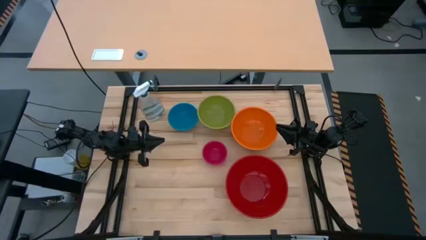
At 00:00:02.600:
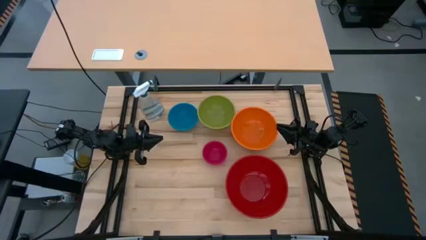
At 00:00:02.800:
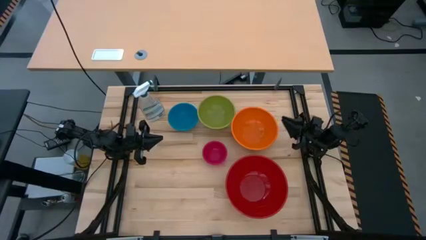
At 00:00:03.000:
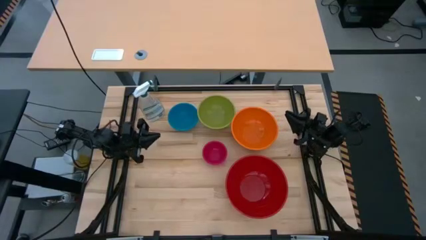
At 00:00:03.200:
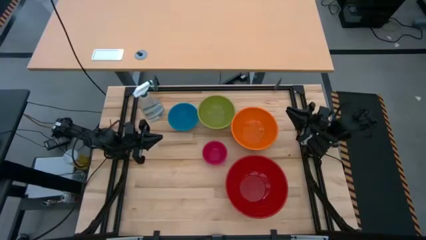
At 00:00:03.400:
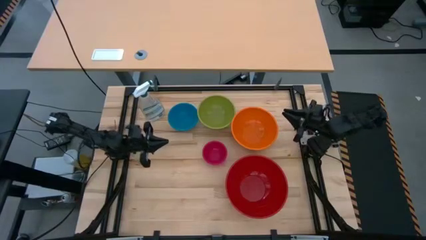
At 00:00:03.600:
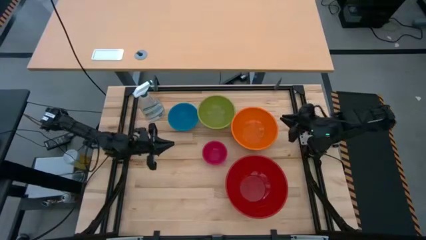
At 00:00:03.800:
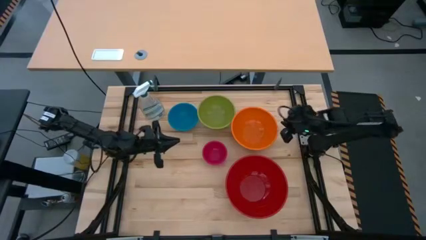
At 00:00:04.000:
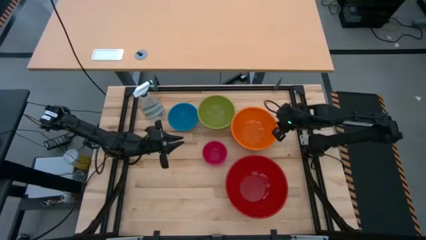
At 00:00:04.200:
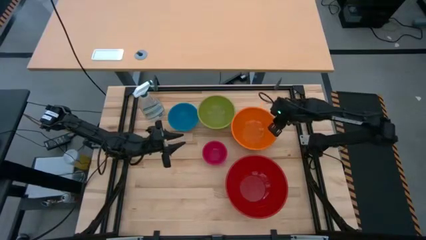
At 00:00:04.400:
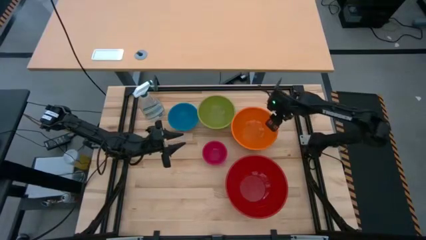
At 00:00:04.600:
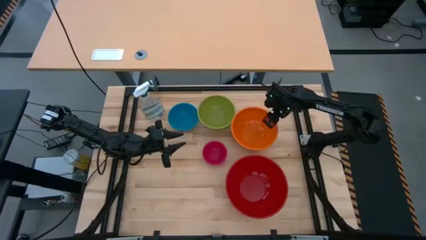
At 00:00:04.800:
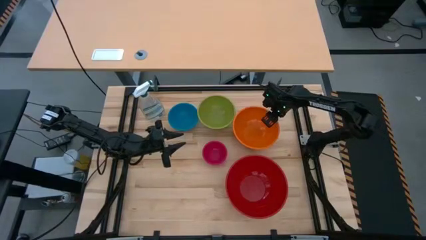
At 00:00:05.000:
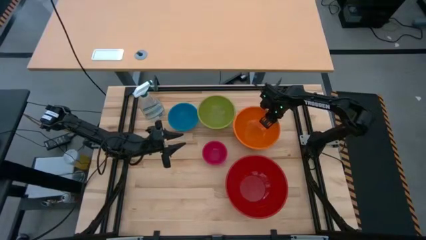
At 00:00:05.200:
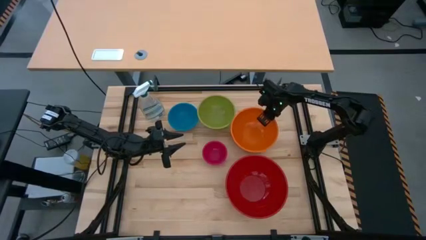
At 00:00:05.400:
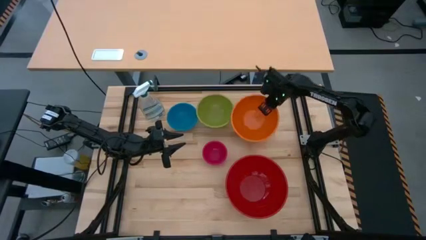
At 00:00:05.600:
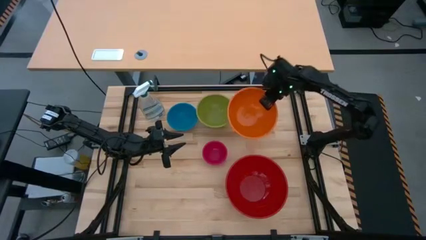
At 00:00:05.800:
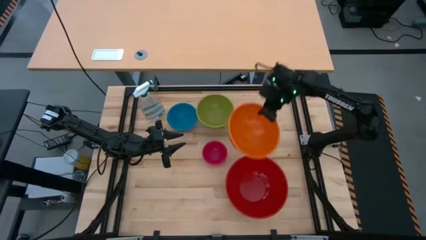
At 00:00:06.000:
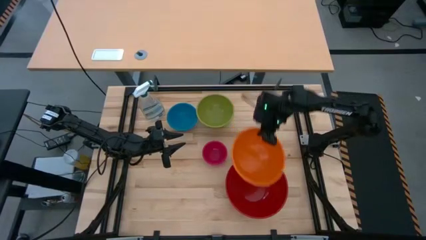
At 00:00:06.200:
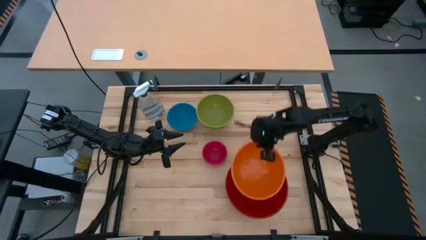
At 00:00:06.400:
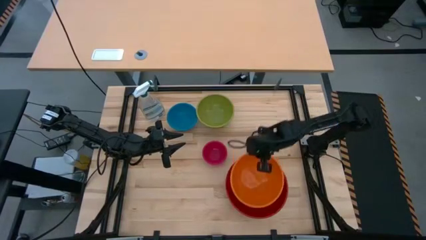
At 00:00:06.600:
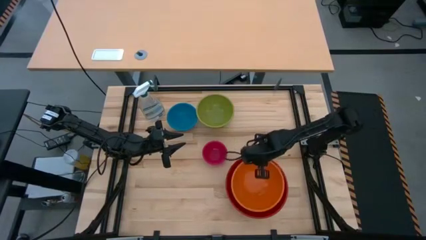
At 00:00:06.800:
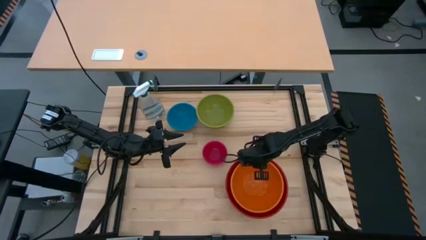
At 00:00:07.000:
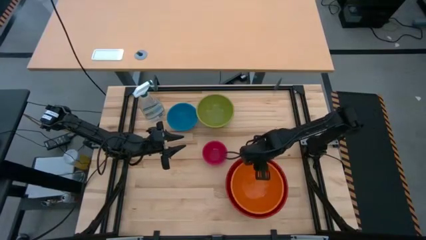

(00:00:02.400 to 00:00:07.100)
Stack the orange bowl on top of the red bowl

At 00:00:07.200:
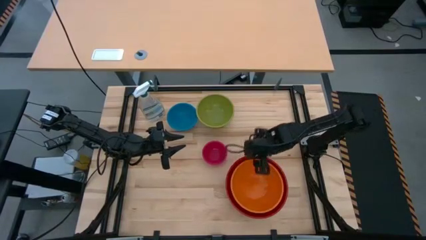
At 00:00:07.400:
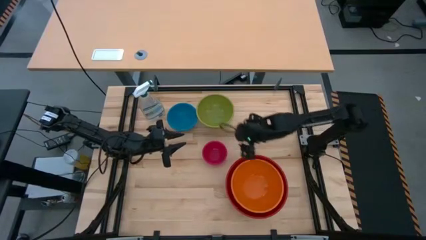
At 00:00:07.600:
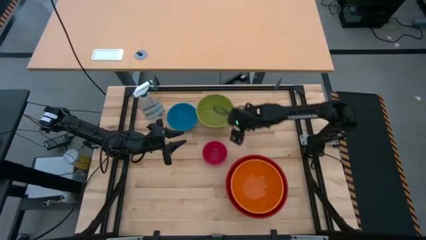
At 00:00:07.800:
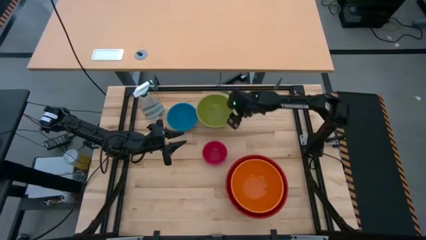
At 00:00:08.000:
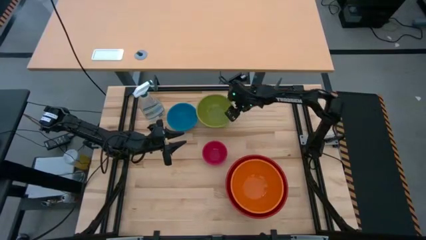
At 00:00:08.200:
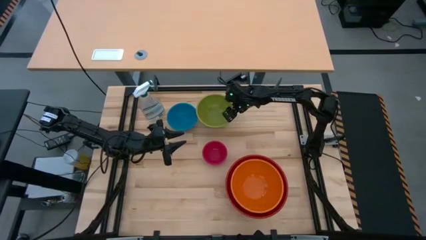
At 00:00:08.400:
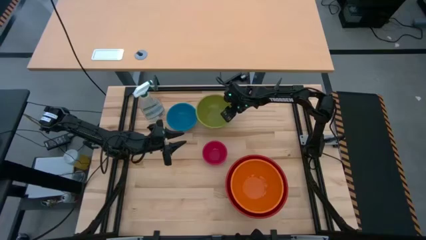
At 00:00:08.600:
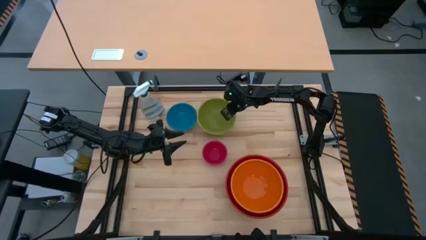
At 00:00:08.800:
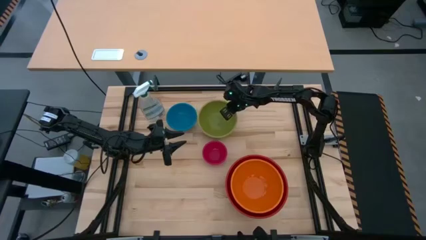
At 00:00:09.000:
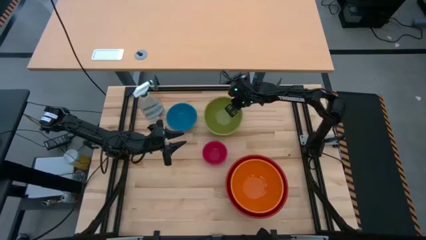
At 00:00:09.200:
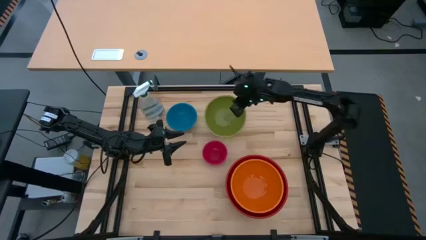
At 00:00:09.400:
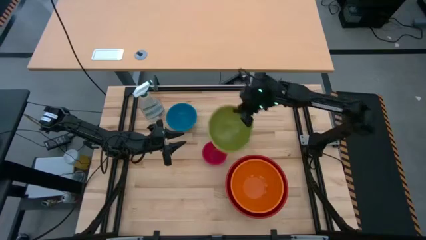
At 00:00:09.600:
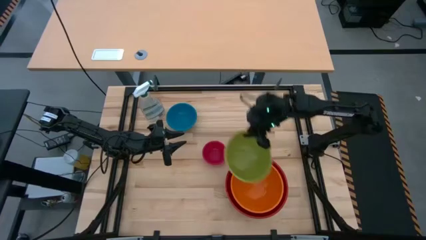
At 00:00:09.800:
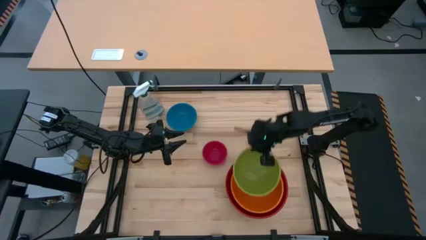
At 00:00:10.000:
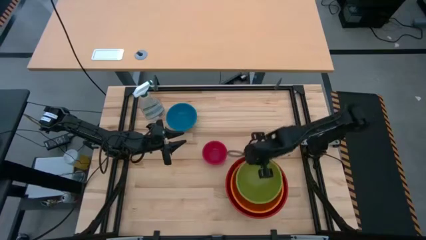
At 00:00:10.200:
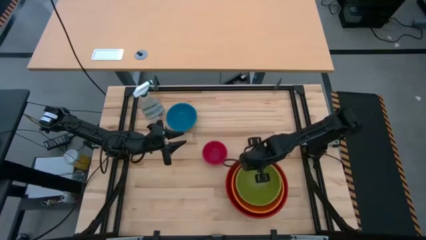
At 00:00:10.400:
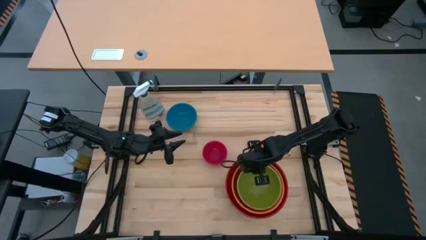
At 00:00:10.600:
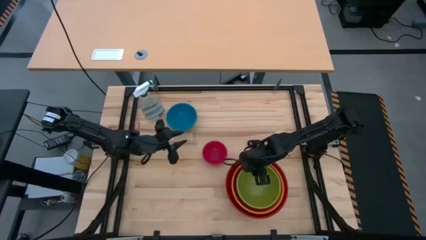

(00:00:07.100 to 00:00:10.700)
Stack the green bowl on top of the orange bowl

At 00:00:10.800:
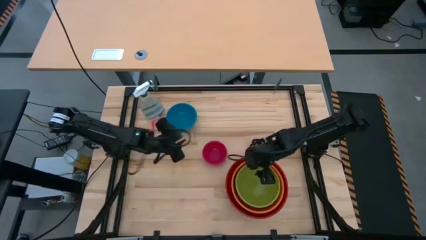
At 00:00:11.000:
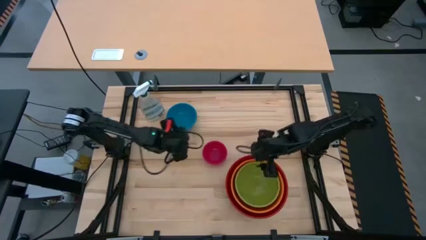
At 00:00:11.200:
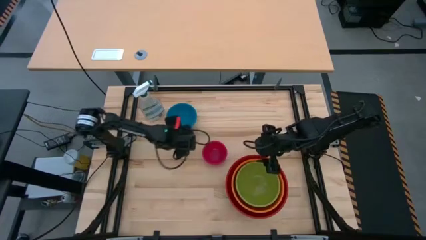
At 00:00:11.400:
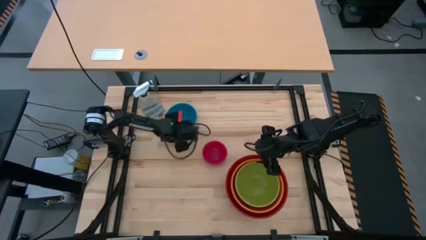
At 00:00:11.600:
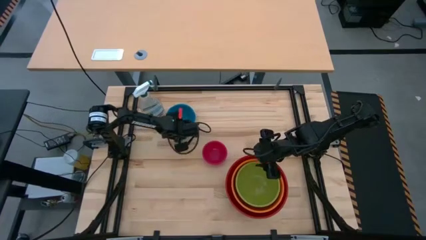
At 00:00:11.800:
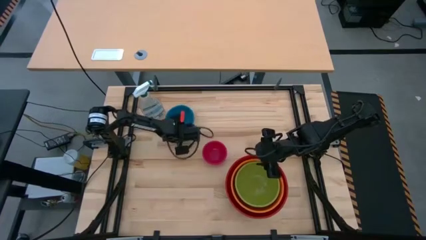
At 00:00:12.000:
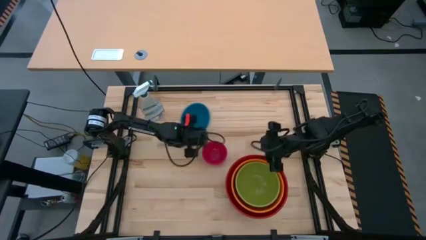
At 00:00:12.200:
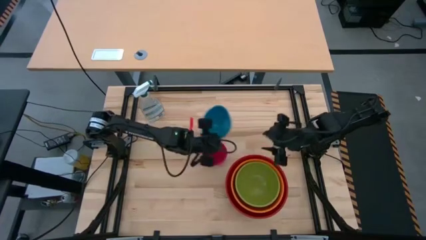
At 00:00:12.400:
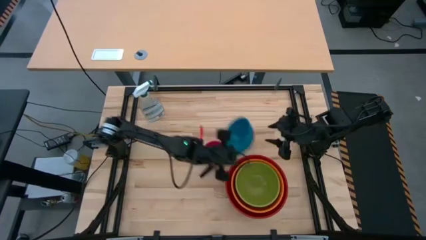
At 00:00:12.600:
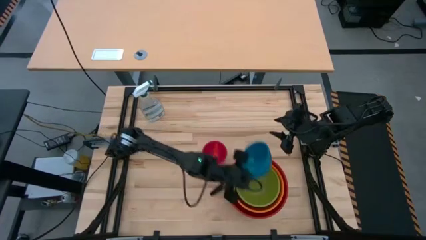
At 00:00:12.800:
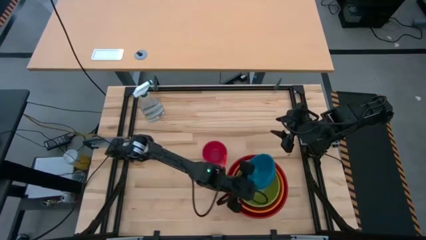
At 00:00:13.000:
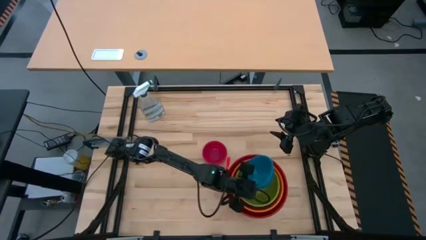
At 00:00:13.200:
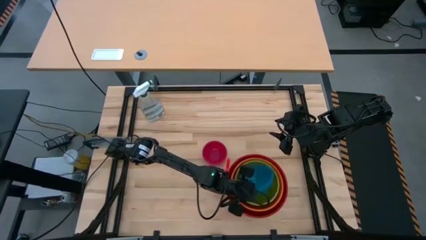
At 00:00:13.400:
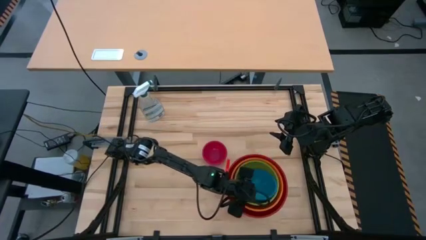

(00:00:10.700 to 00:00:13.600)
Stack the blue bowl on top of the green bowl

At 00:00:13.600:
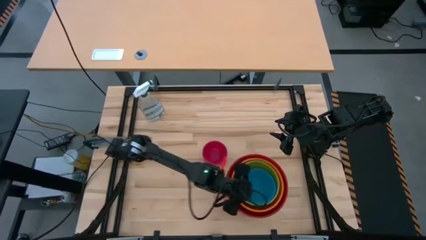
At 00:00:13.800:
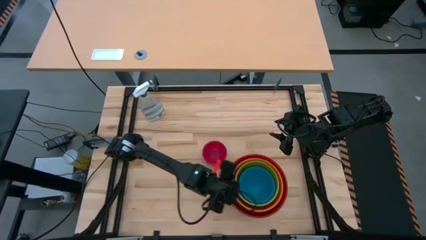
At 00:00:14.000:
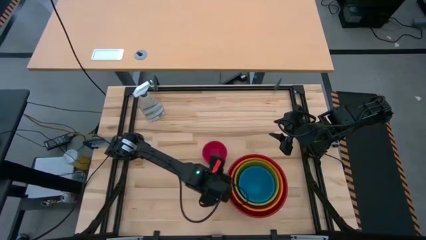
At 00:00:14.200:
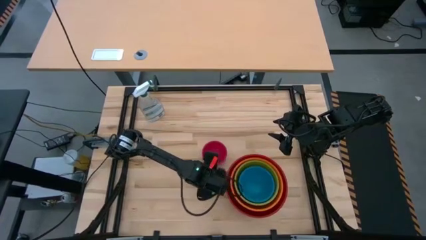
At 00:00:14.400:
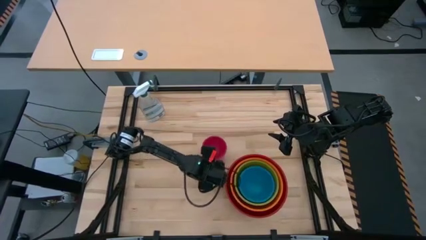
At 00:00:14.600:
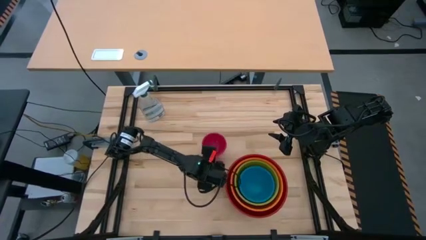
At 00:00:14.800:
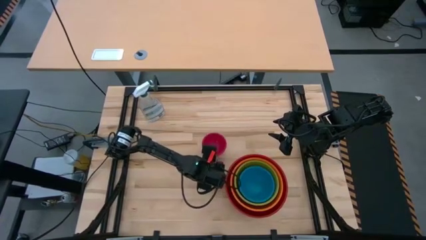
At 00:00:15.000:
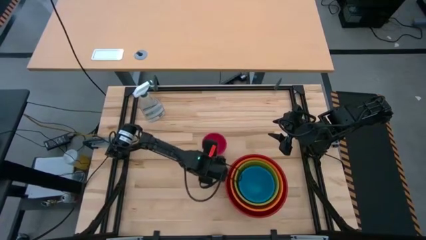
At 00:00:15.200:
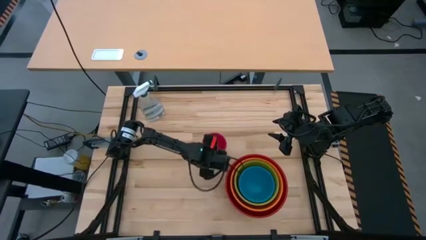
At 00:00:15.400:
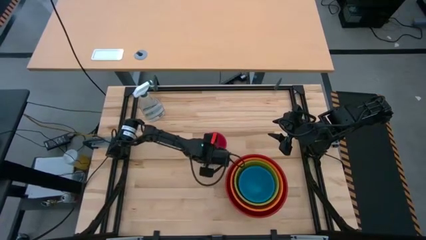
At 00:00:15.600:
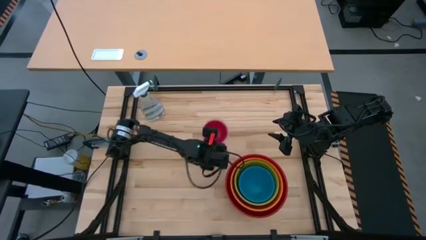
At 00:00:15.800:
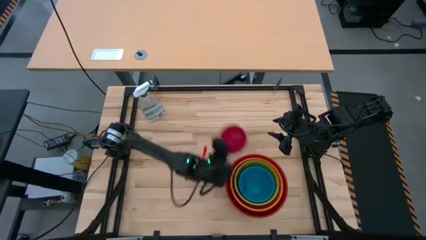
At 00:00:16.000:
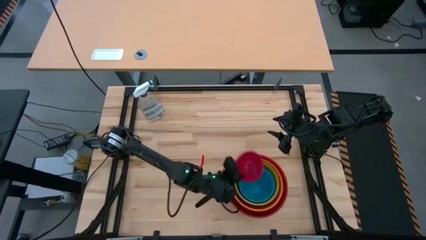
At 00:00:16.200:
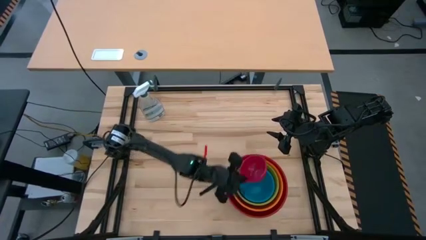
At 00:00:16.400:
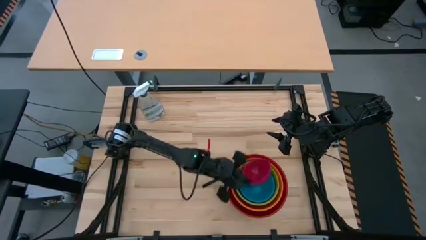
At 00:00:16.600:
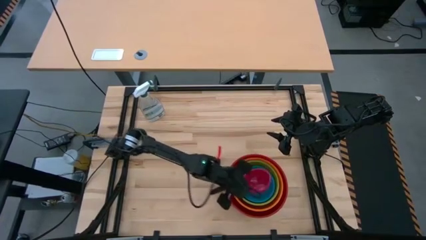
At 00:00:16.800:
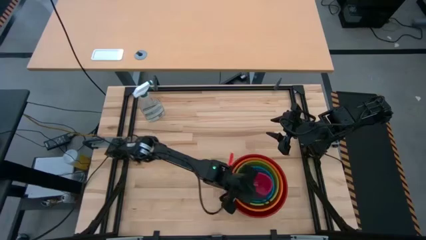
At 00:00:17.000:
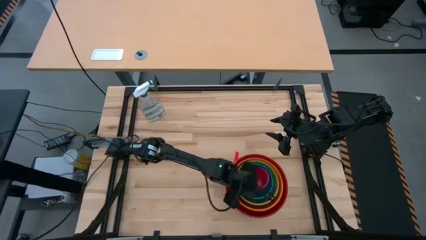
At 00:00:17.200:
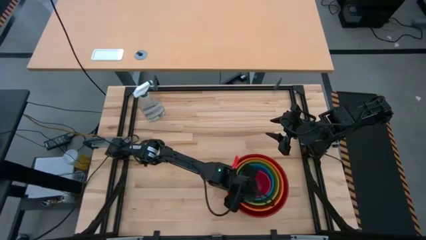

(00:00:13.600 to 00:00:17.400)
Stack the pink bowl on top of the blue bowl
